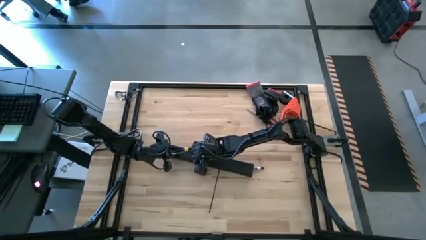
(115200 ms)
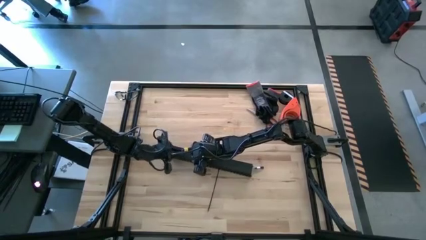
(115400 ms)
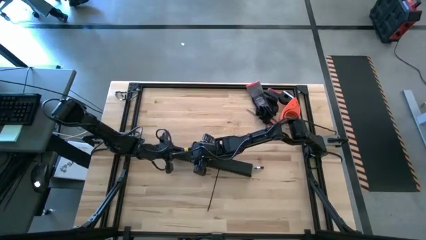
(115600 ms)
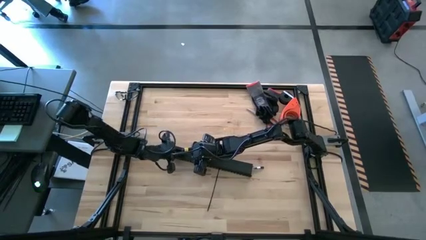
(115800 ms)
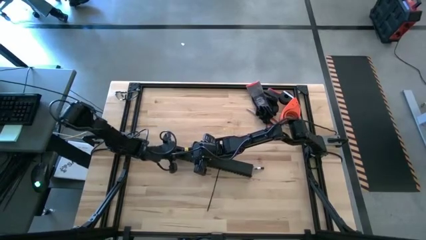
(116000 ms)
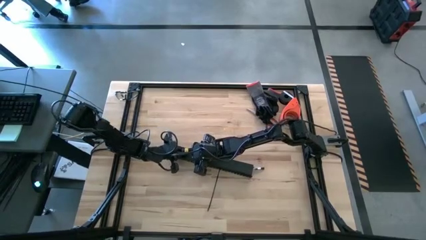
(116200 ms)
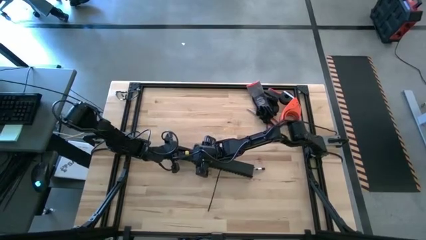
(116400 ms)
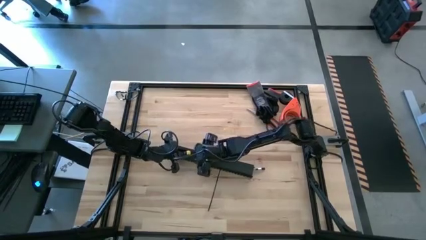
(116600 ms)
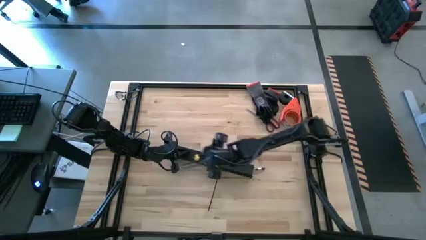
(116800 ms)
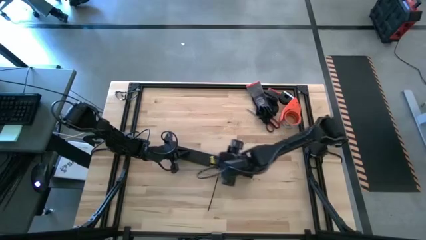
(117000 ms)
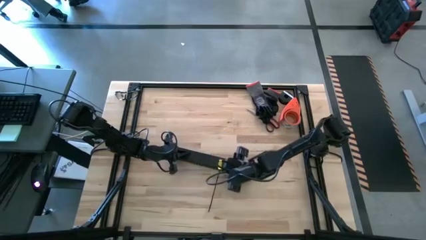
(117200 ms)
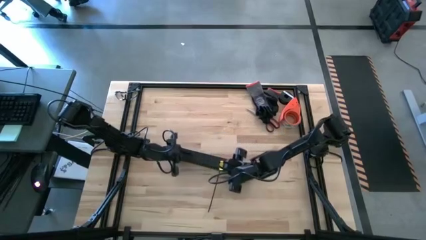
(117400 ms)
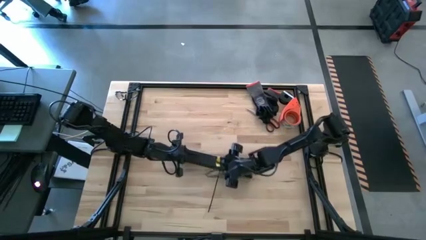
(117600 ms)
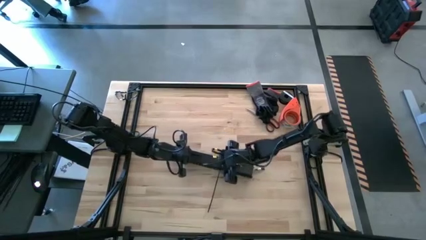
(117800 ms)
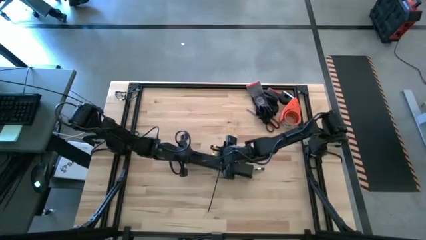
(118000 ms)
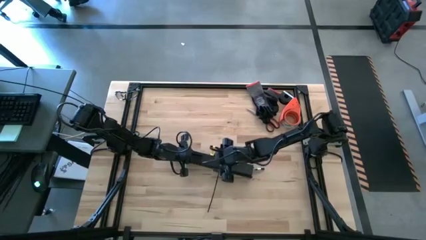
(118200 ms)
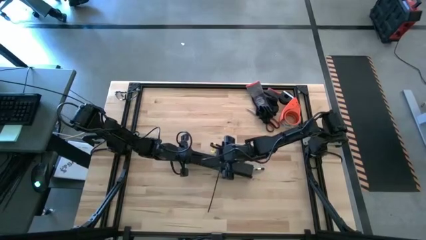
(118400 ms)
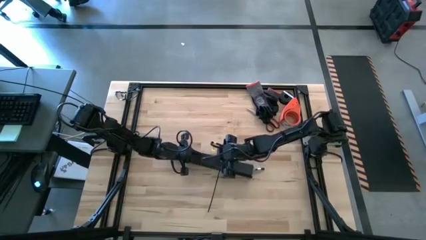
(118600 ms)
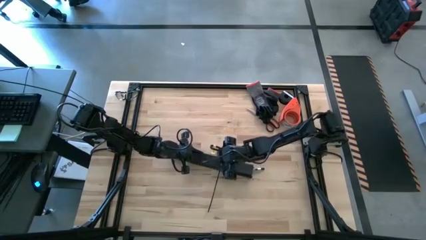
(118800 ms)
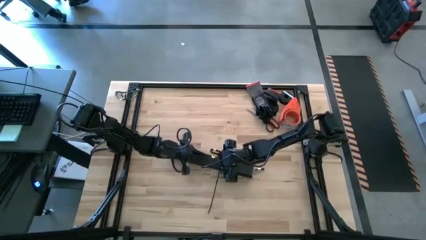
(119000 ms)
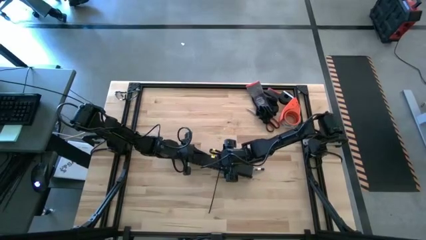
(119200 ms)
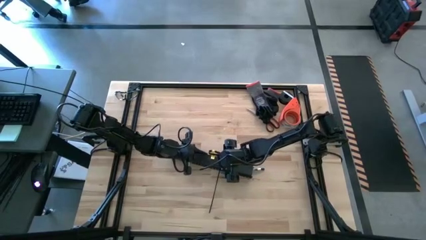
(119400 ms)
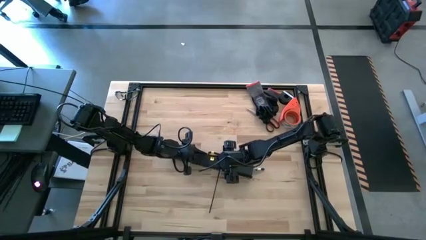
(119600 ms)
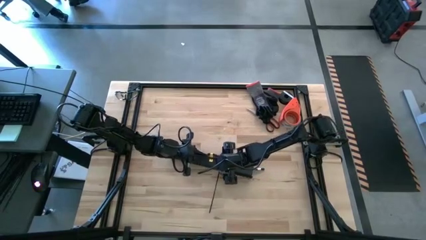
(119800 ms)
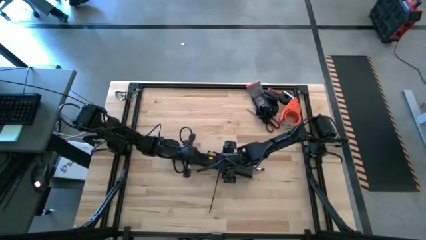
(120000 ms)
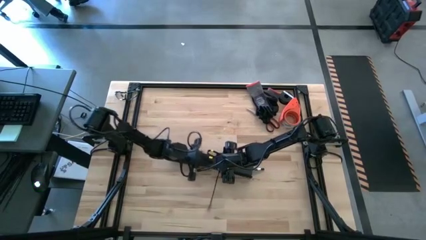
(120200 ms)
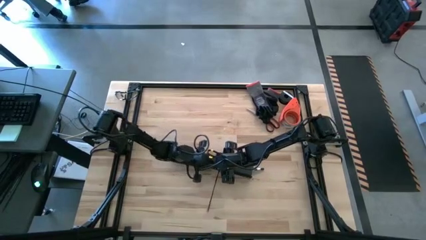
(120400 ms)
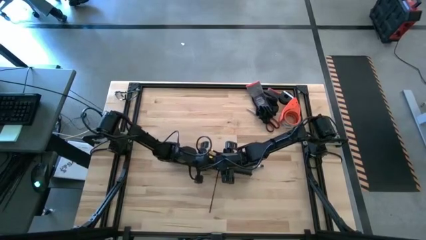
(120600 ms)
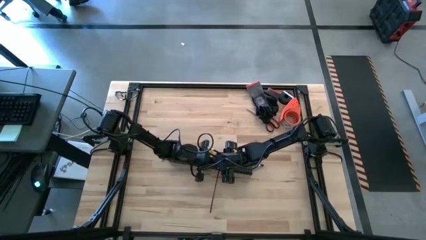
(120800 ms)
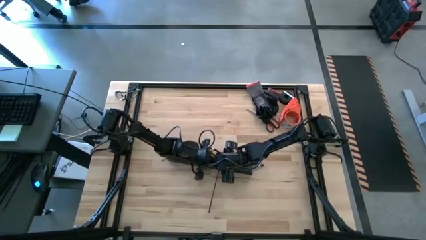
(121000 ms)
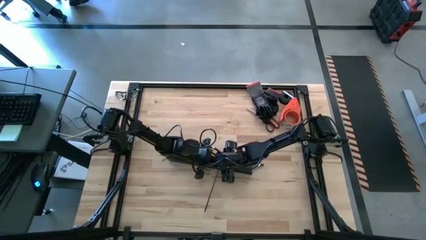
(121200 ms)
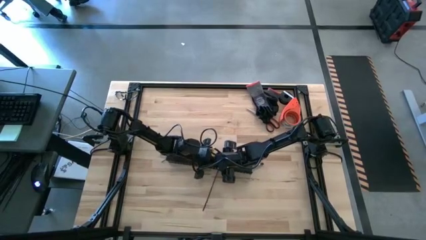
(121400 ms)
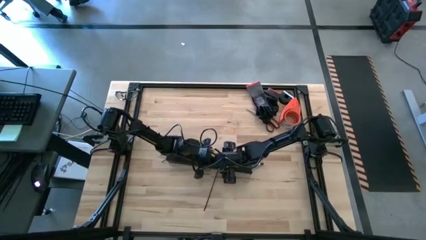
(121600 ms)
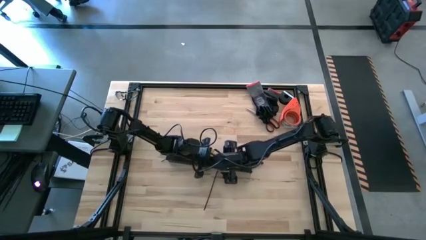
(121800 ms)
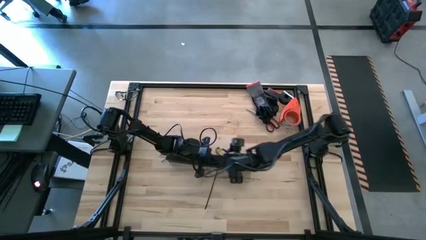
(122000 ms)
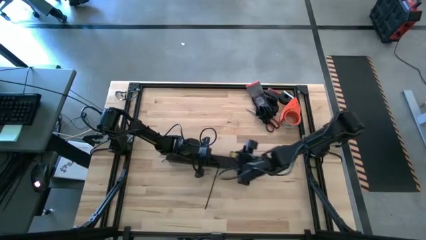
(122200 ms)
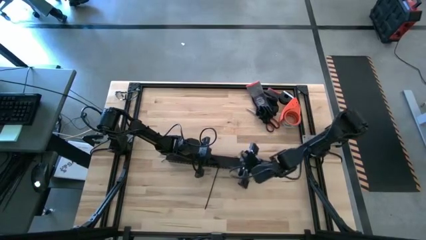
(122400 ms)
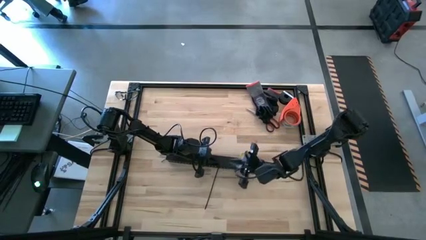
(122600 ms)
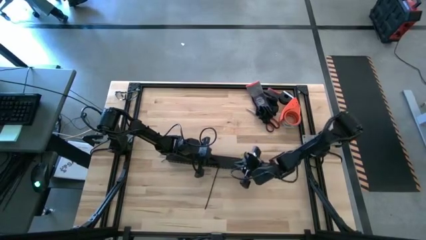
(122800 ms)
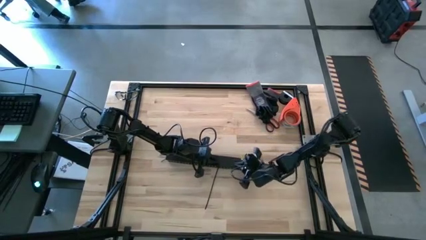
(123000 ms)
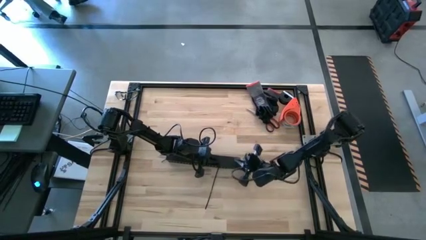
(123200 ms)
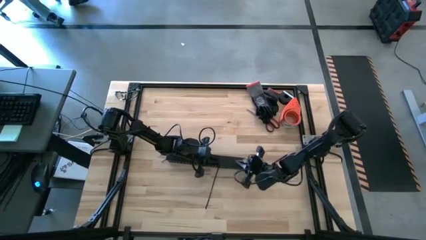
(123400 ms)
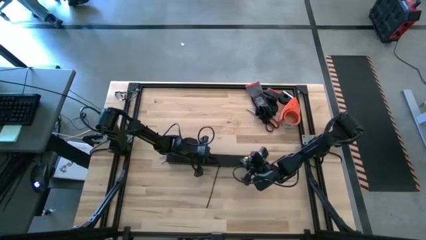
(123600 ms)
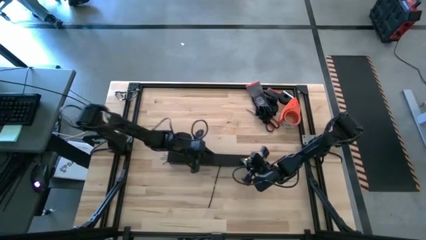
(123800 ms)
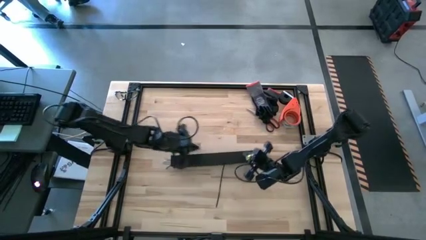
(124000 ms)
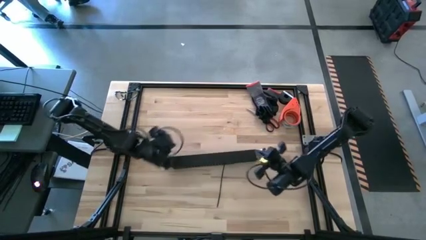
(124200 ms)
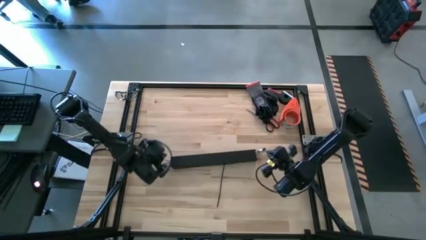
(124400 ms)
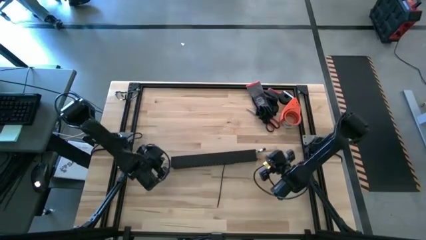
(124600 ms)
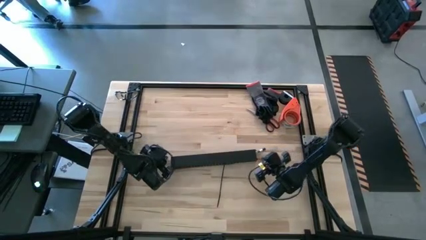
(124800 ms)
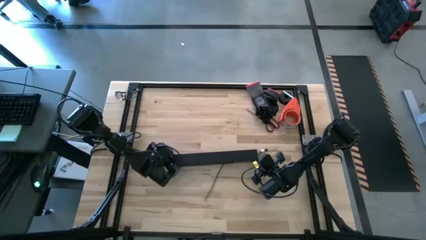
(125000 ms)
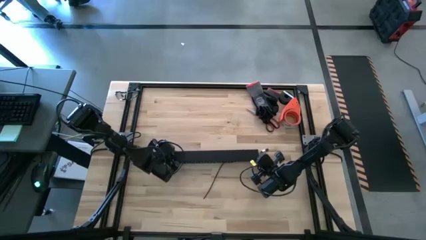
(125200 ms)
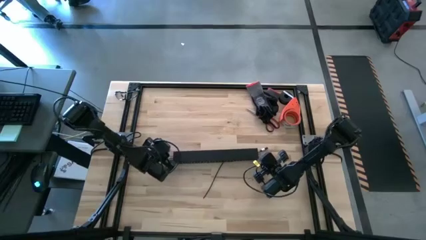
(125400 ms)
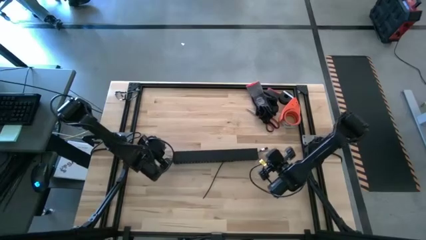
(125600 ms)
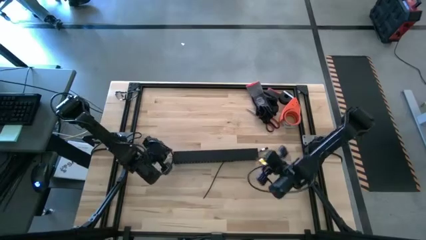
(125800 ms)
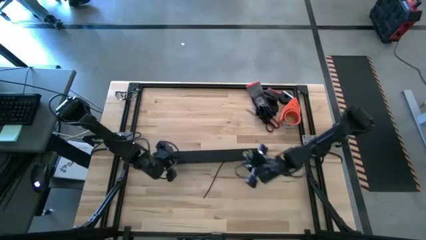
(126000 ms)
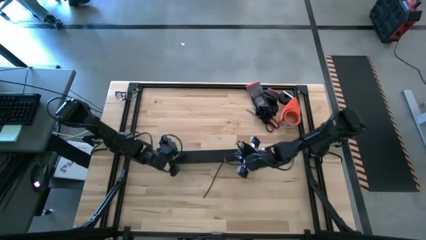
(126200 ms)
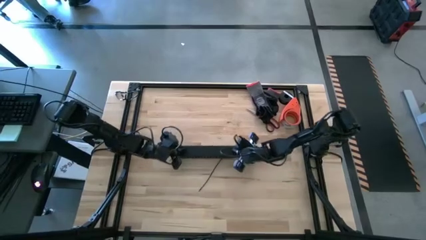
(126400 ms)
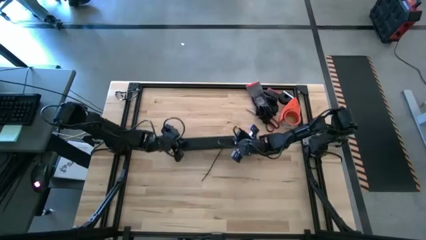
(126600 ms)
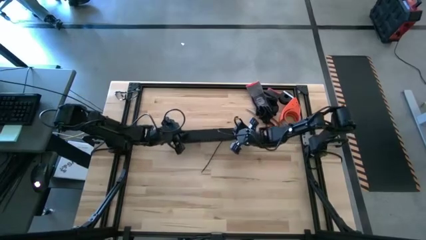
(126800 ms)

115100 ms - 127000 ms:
Task: Ziptie cables
Close the cable duct cover

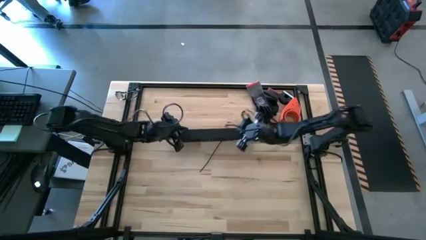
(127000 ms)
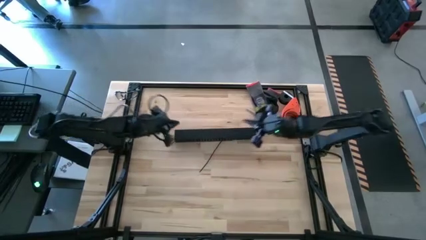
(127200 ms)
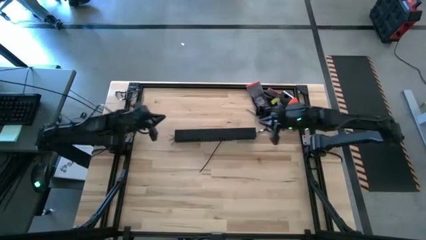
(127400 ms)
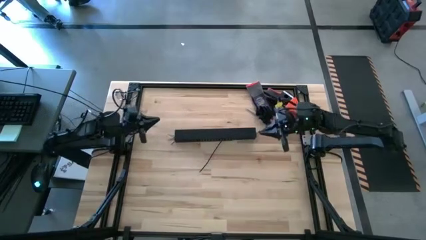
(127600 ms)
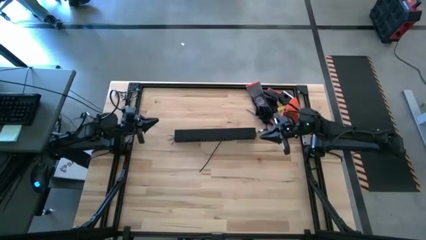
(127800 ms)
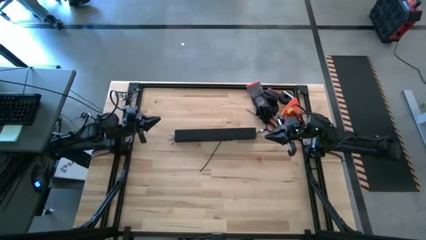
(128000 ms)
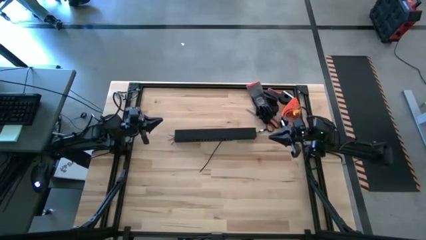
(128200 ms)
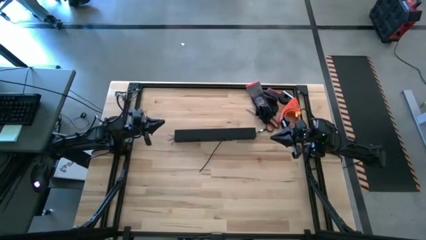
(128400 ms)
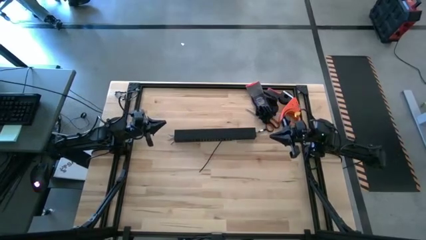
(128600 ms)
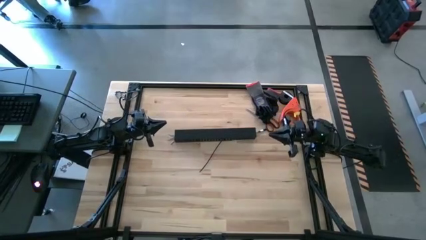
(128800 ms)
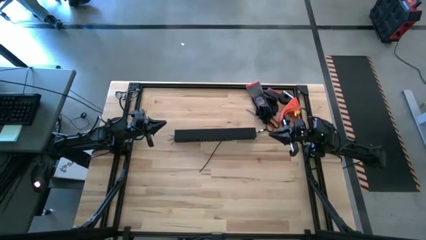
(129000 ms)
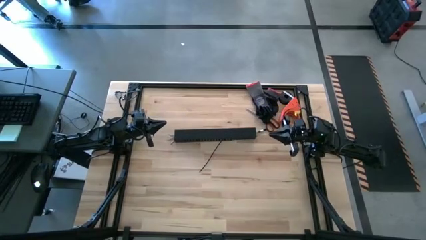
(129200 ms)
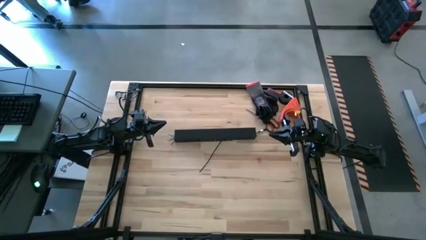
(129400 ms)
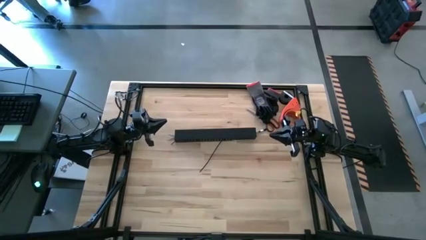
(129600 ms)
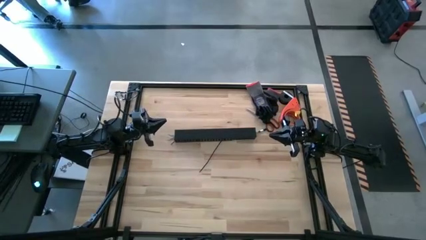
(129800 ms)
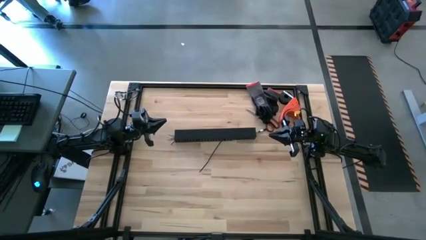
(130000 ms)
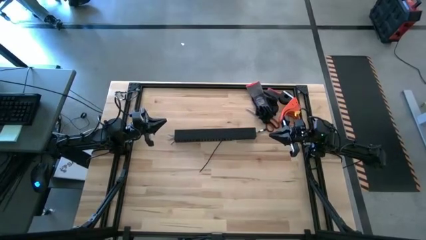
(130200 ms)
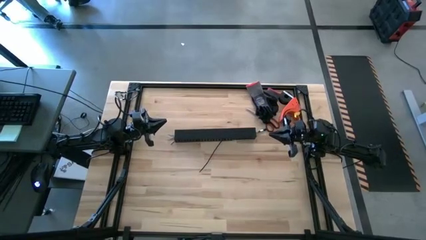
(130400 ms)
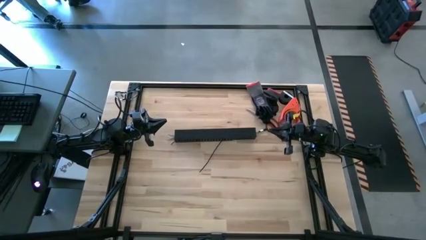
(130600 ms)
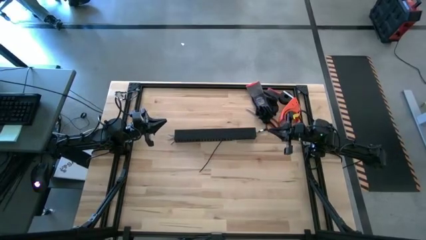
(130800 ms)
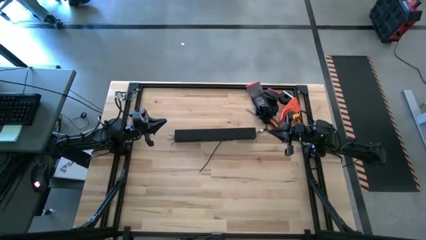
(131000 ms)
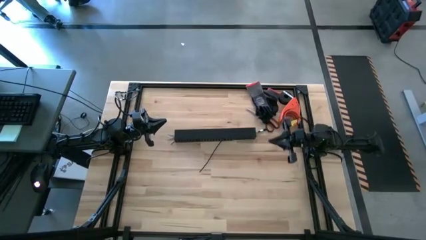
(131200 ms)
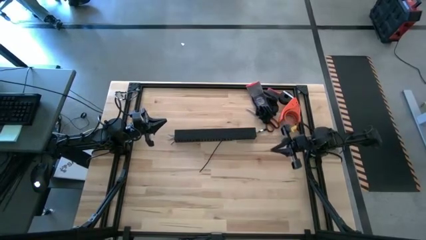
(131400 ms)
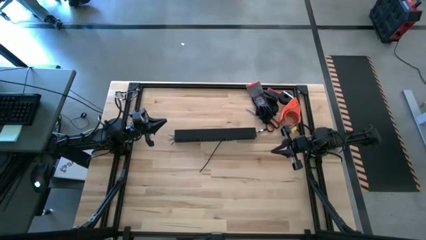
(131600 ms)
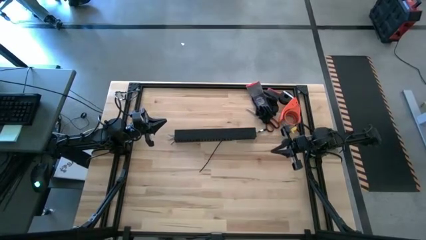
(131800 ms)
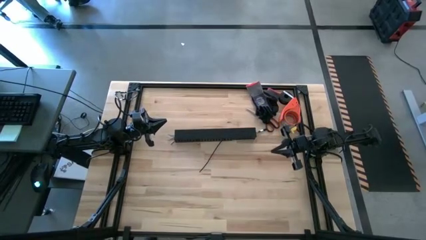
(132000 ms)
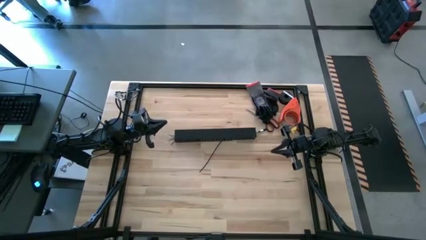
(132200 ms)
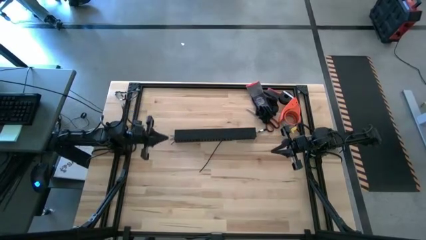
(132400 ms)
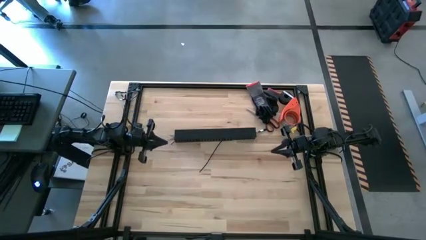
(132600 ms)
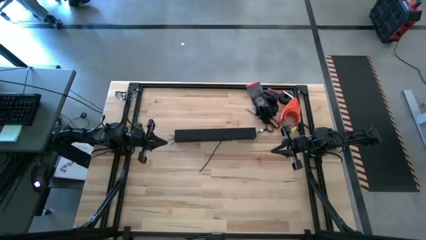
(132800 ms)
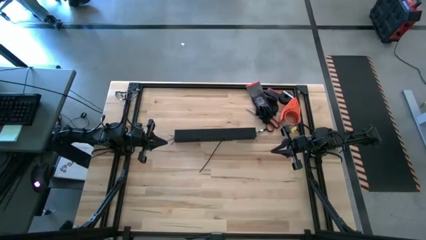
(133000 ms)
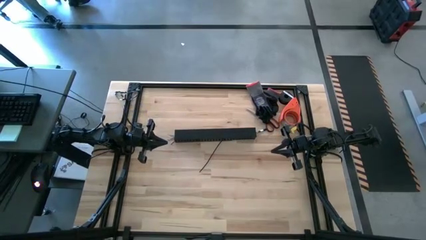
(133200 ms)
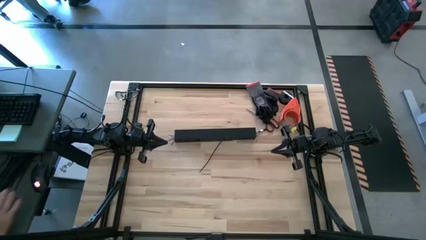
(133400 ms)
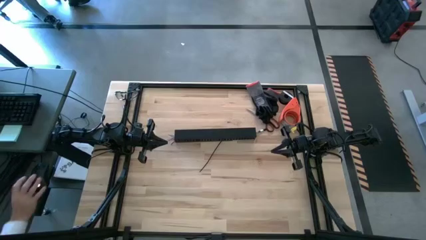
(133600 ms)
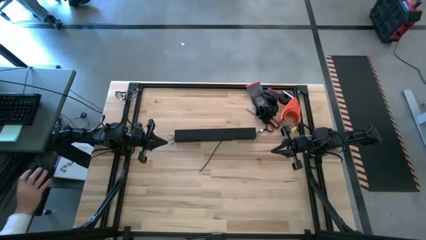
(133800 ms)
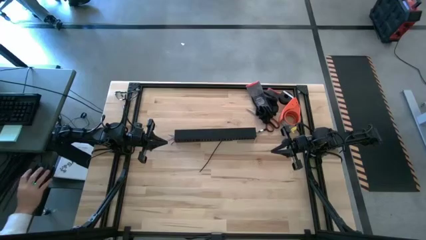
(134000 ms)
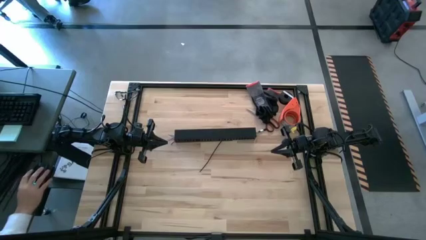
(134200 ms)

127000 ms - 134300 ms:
Return to Home Position
